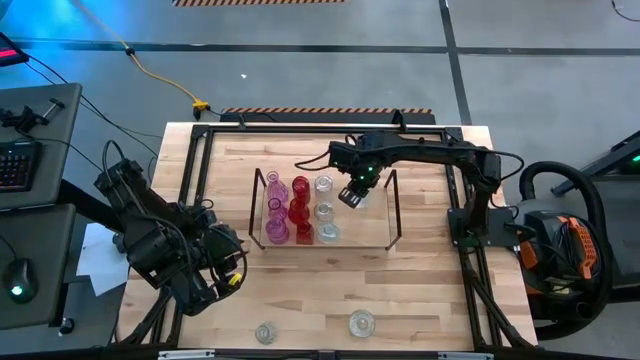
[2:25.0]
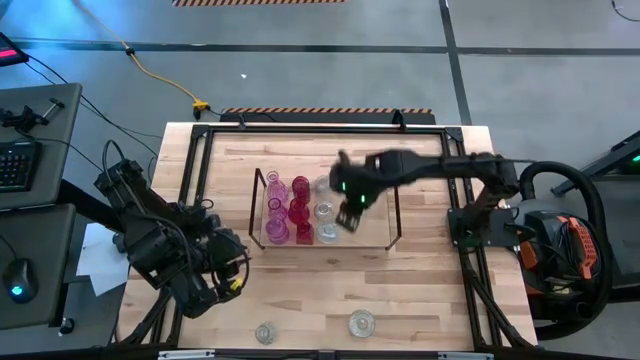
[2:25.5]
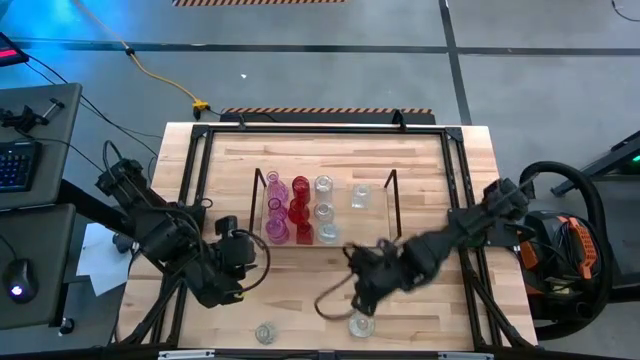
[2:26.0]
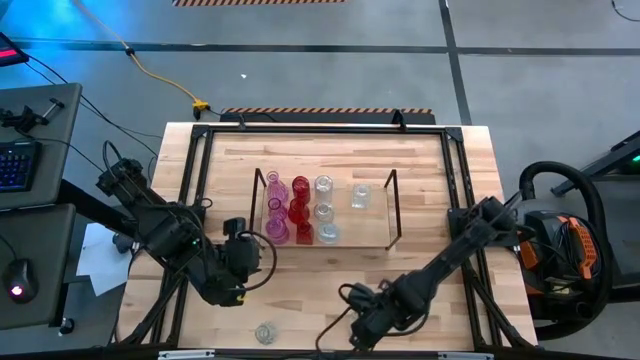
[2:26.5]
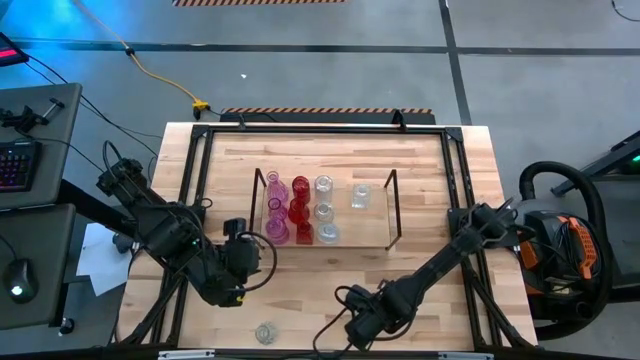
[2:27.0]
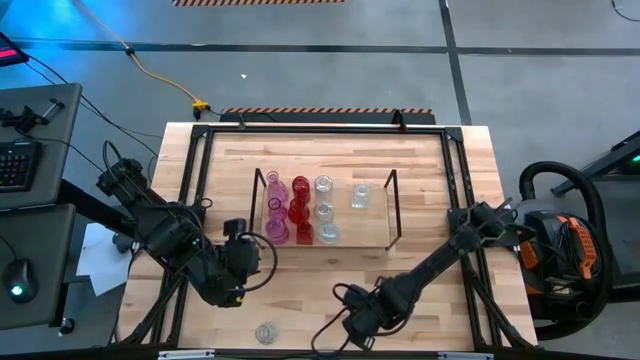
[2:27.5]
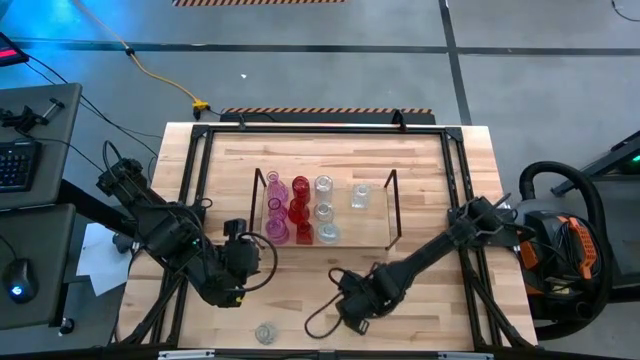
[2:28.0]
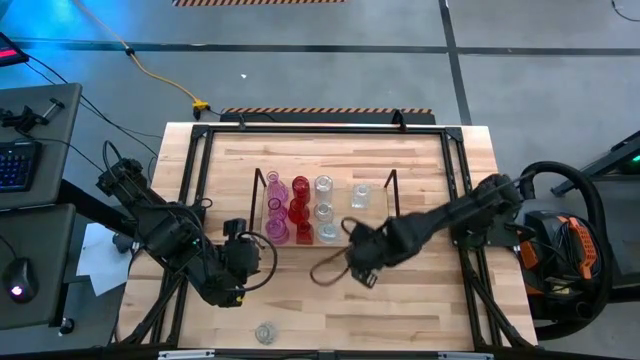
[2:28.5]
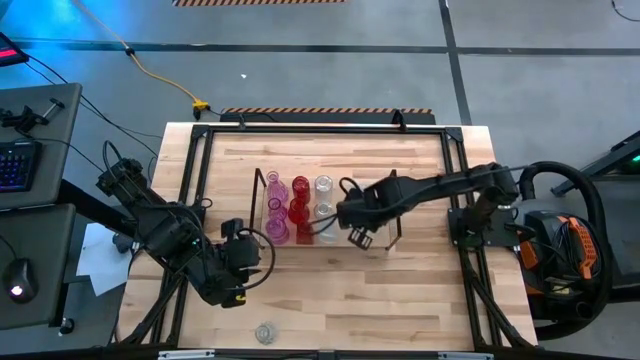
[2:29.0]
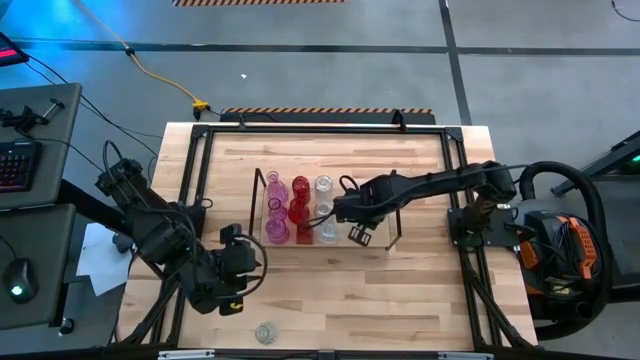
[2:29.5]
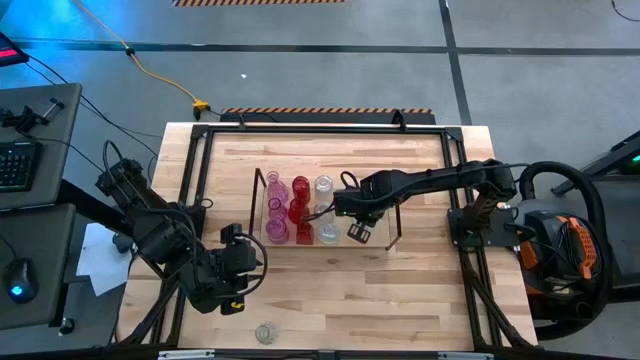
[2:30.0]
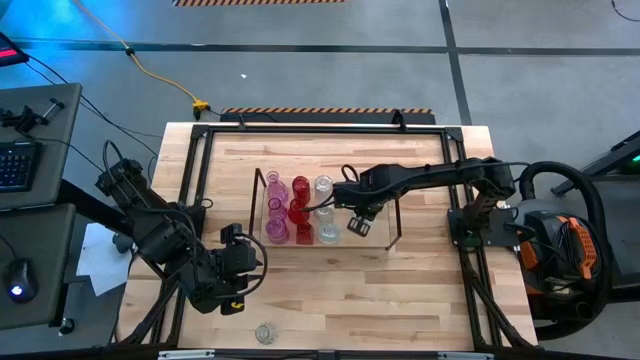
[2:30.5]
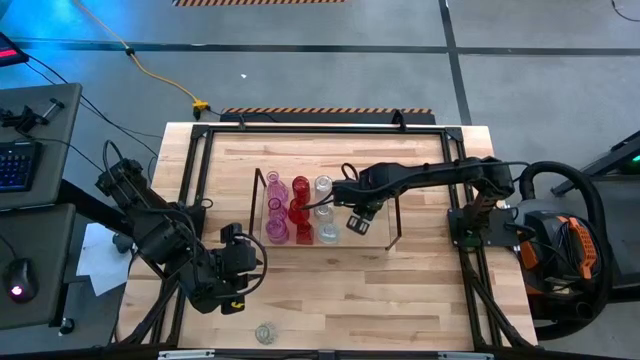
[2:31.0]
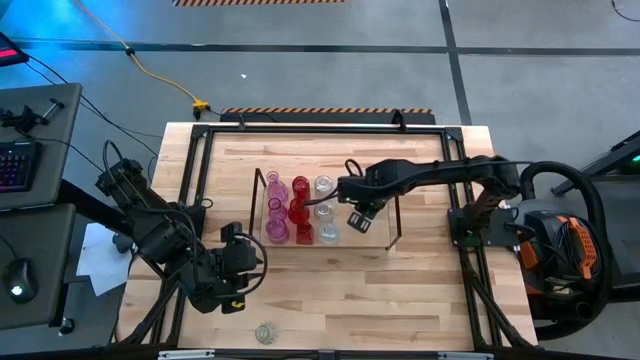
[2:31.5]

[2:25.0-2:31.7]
Task: sort vases onto shelf
Put the transparent vase aligned with the other transparent vase on the shelf

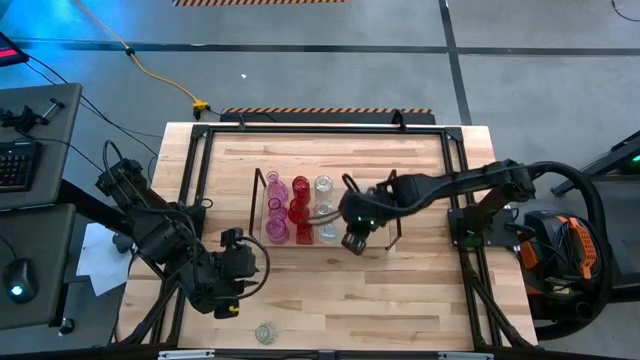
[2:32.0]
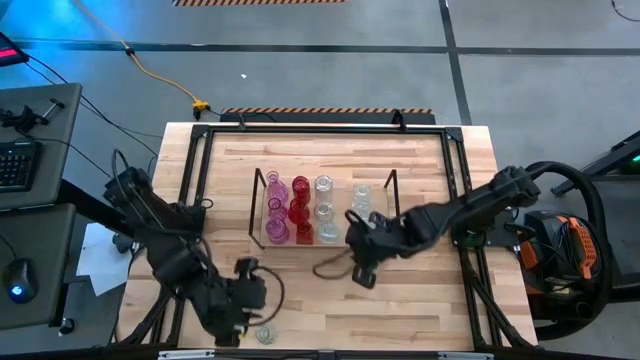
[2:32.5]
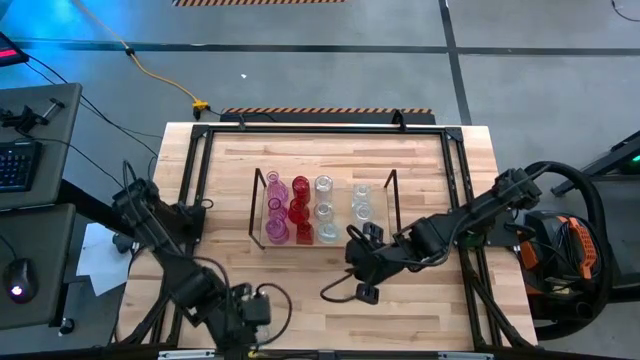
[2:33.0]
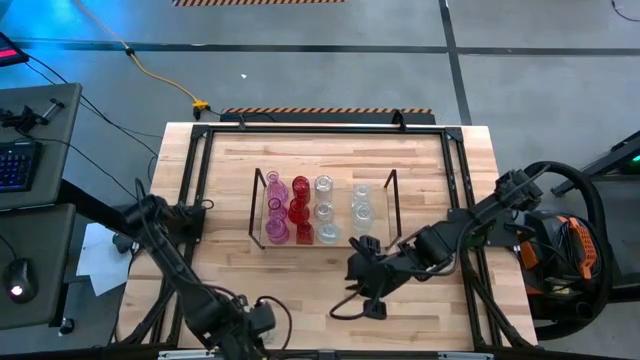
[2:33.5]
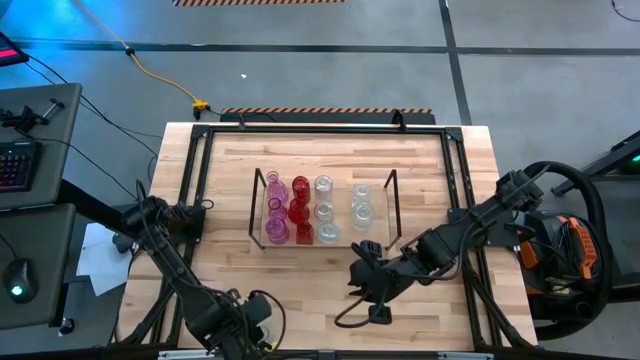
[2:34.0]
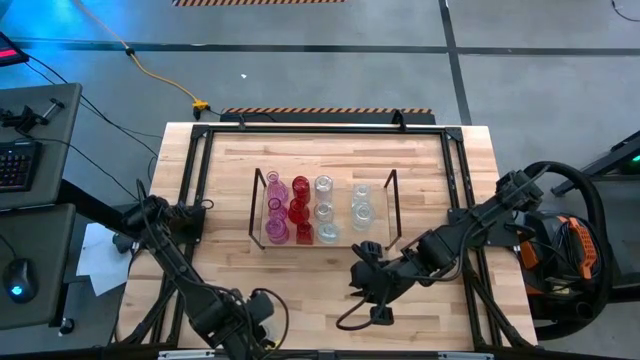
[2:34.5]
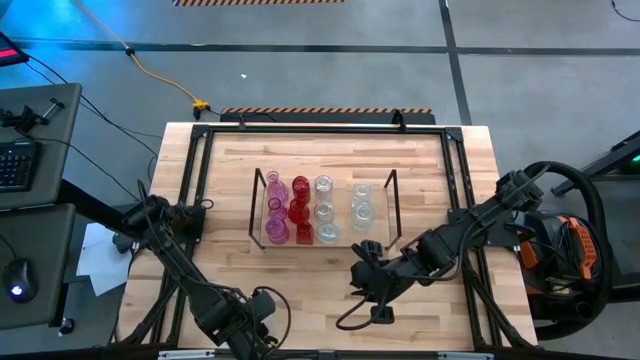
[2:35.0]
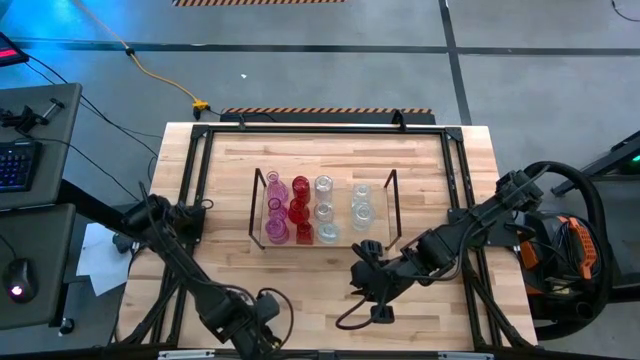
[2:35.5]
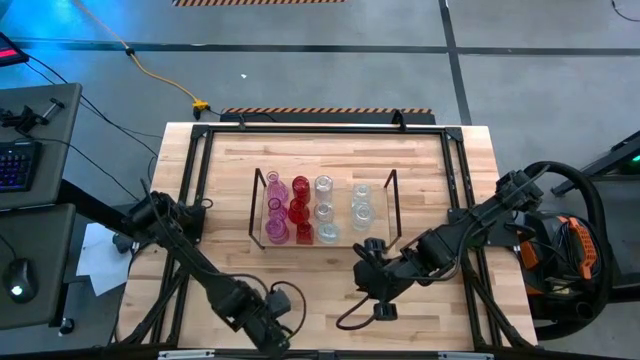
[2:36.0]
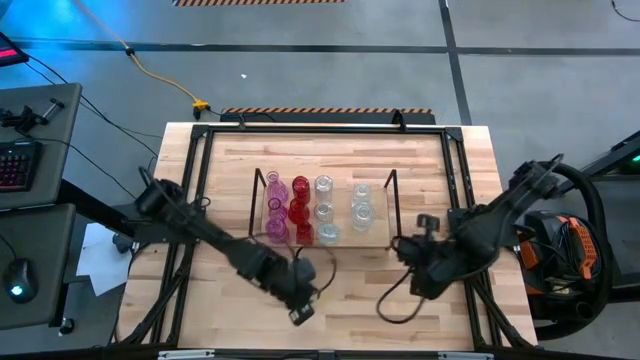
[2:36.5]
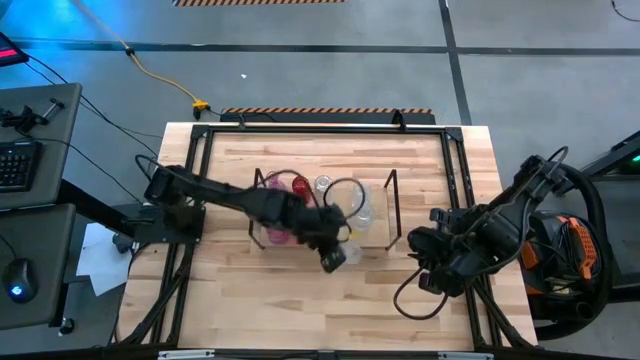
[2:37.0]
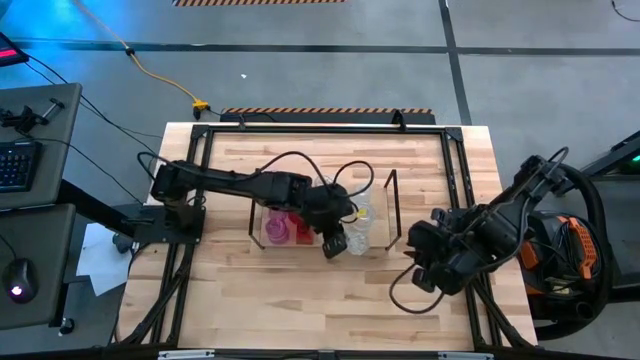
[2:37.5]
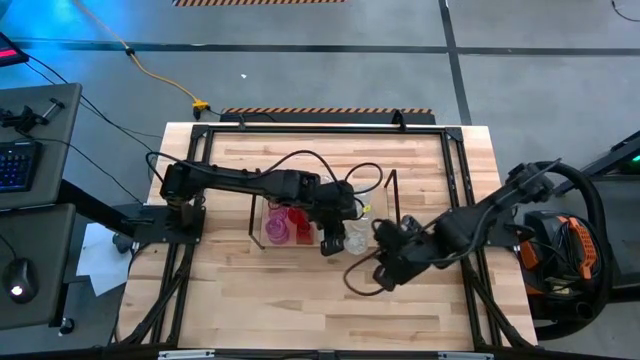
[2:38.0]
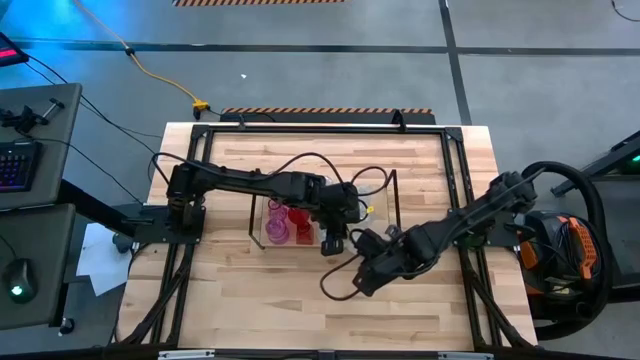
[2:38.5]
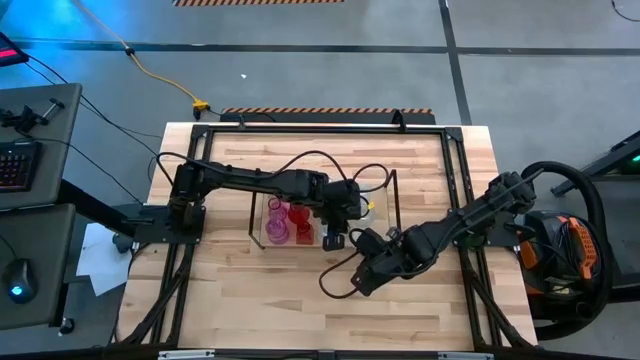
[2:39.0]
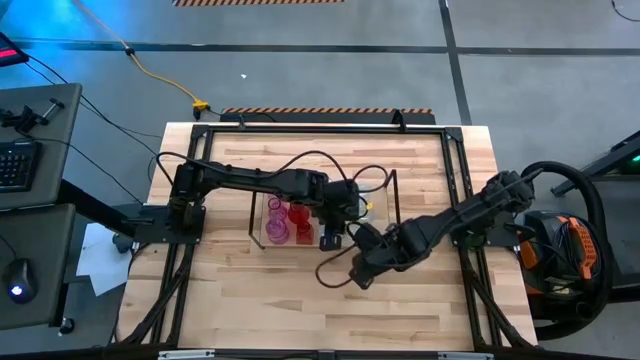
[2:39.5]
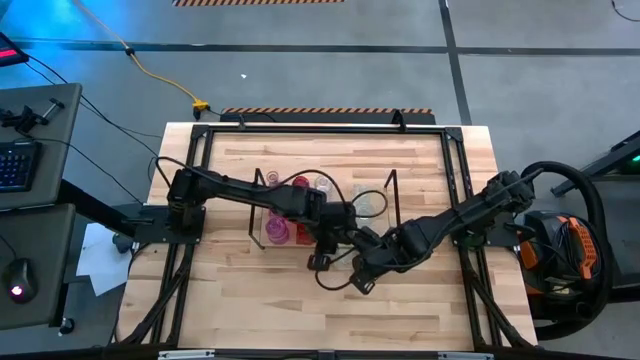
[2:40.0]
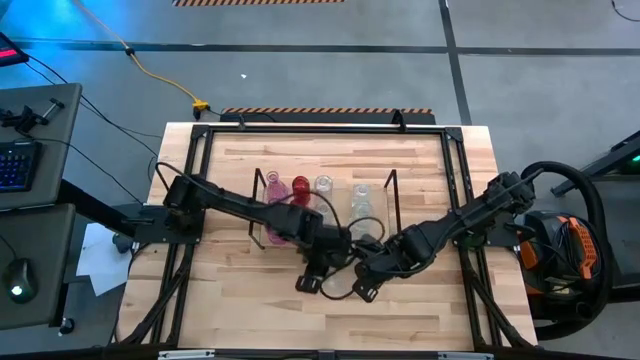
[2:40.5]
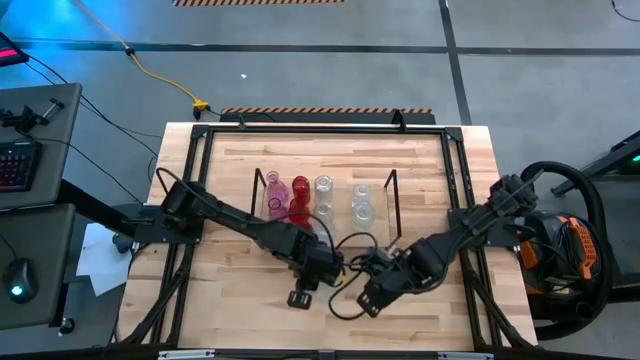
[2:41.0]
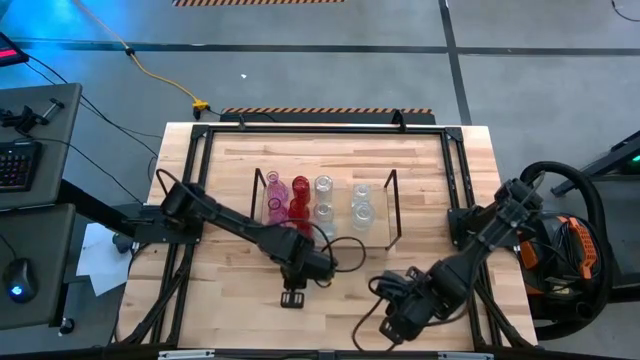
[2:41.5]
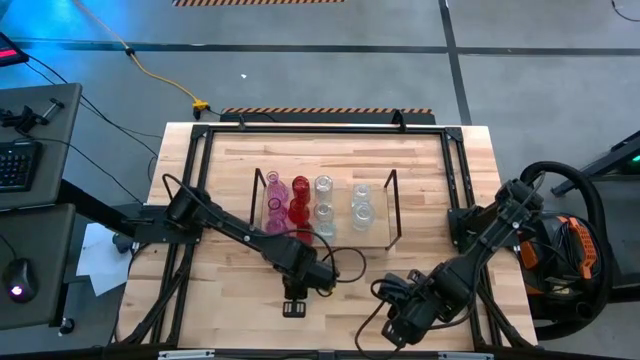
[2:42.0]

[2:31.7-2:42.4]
Put the transparent vase aligned with the other transparent vases on the shelf

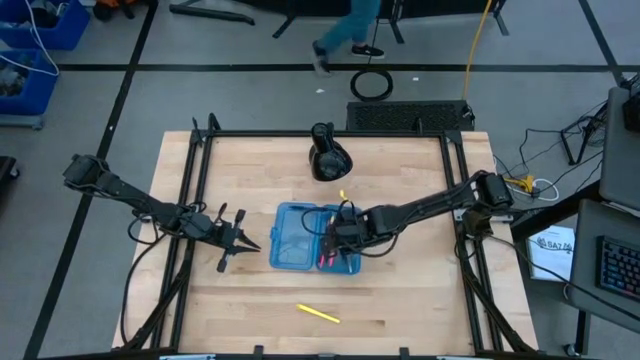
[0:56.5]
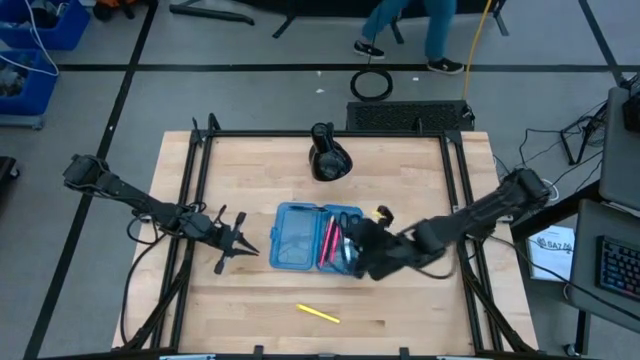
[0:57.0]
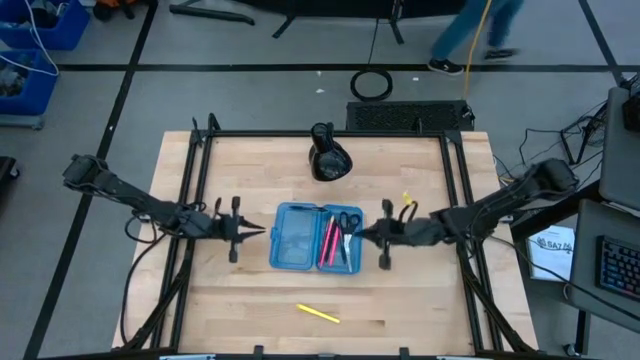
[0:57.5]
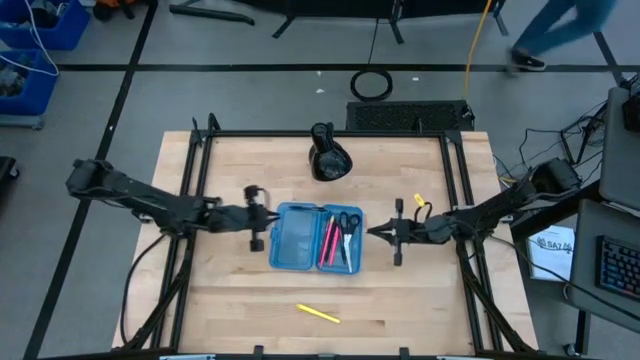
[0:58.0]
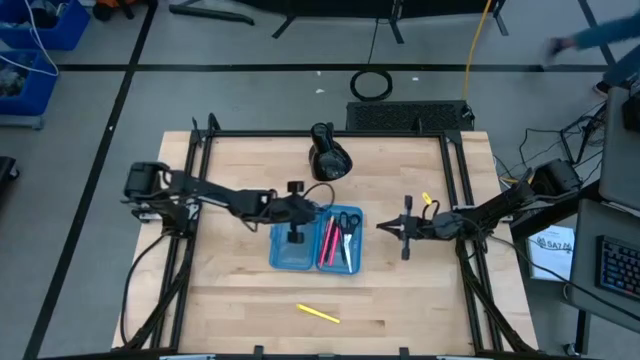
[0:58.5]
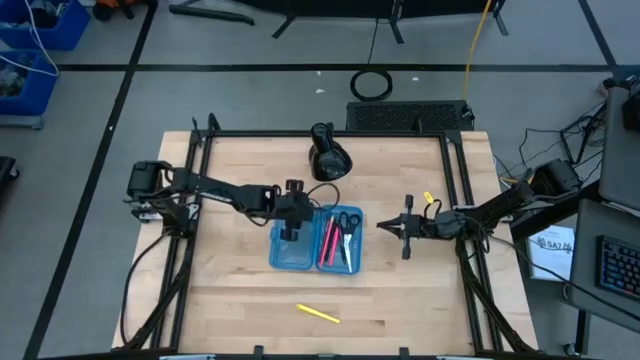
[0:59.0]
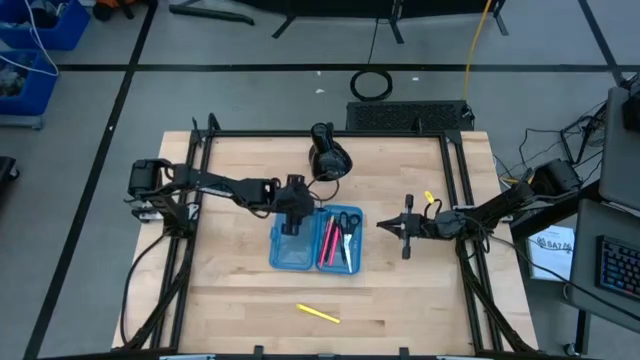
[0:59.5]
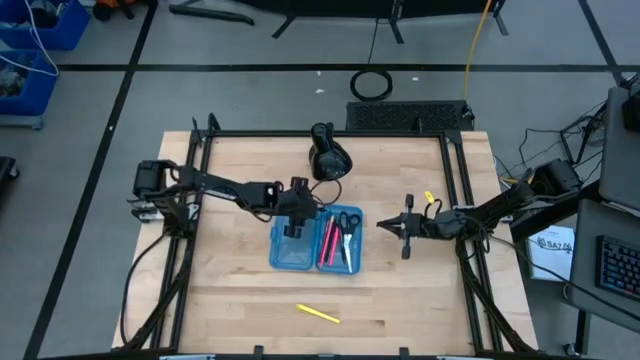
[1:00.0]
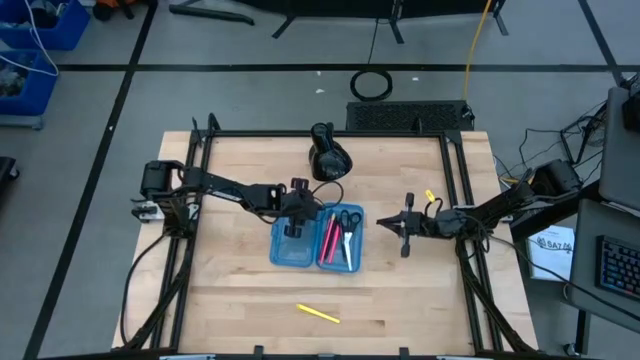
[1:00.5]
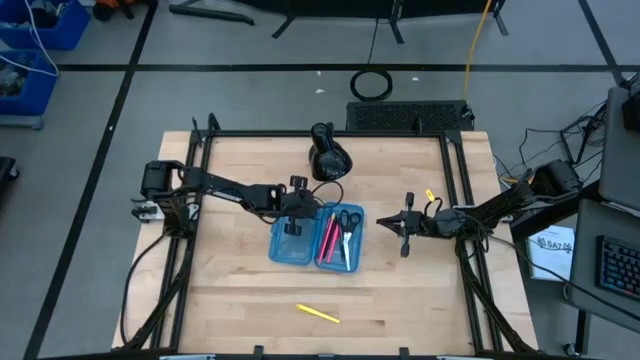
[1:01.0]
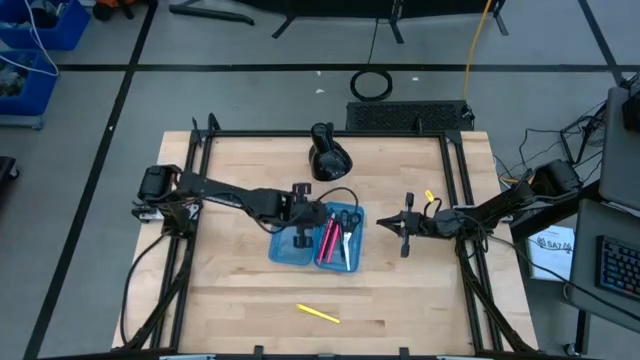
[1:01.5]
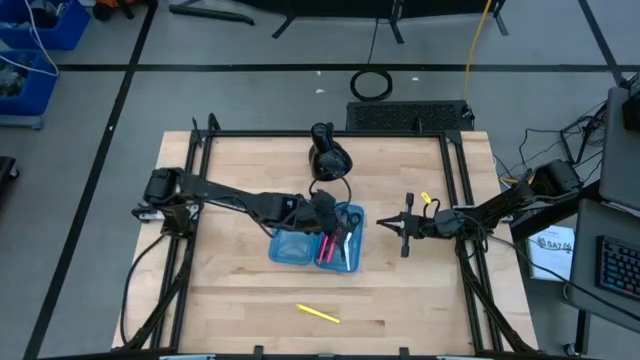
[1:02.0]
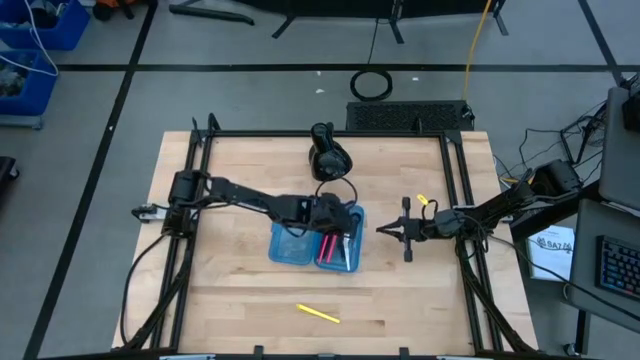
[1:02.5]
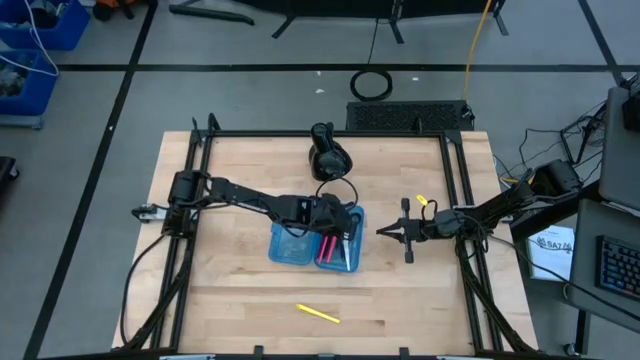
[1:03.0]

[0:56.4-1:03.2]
Task: Pick & place school supplies into a supply box
Put the black pen into the blue supply box
